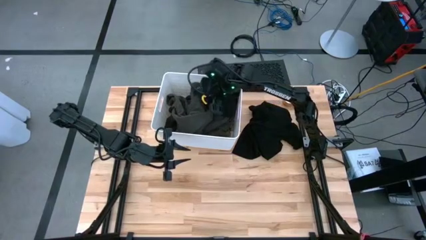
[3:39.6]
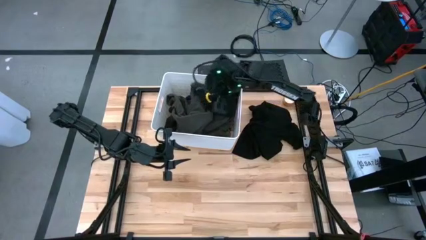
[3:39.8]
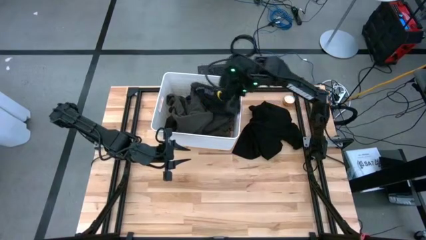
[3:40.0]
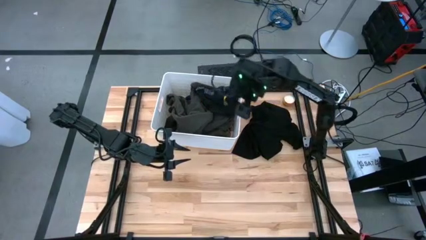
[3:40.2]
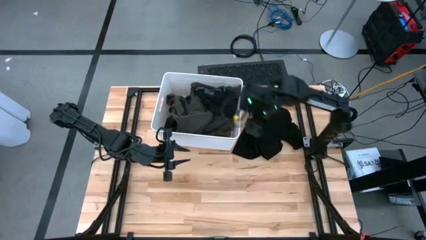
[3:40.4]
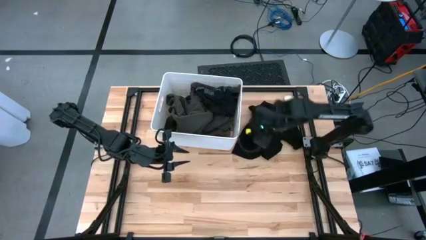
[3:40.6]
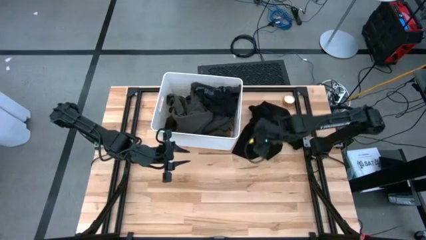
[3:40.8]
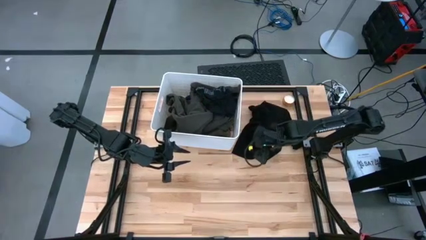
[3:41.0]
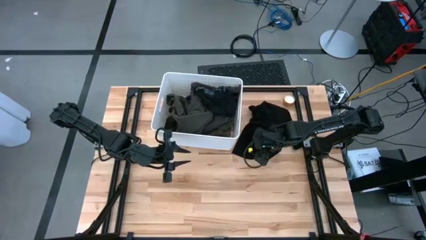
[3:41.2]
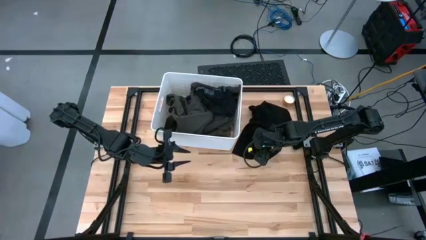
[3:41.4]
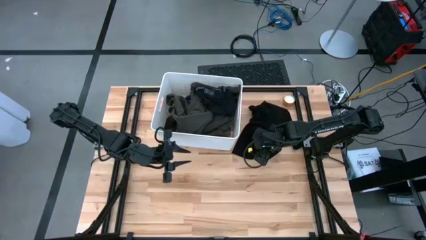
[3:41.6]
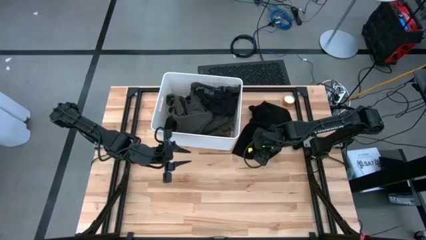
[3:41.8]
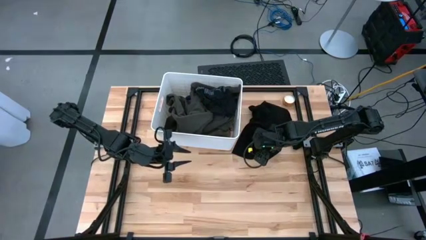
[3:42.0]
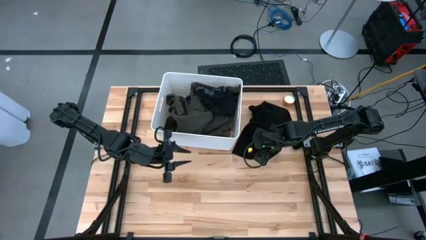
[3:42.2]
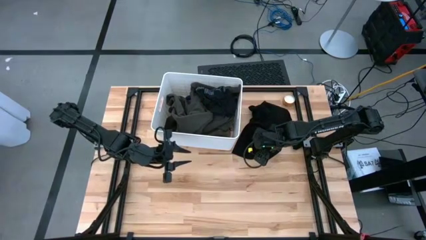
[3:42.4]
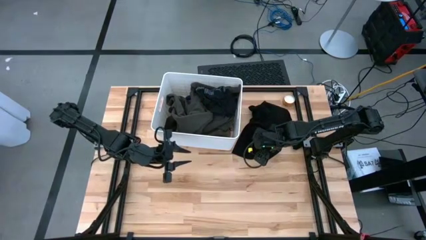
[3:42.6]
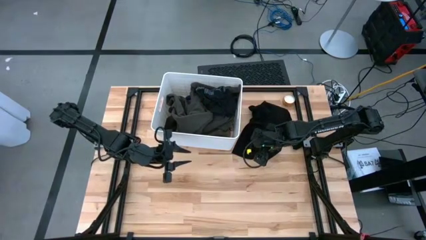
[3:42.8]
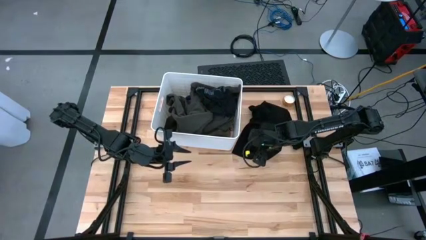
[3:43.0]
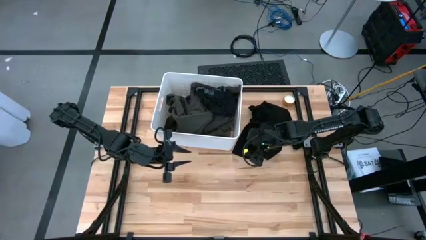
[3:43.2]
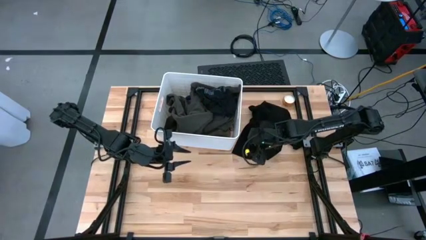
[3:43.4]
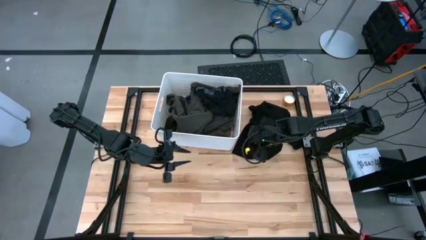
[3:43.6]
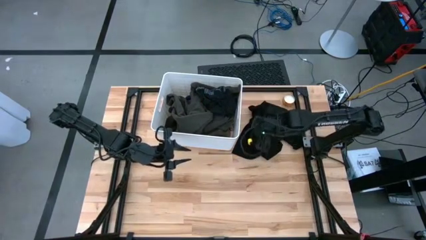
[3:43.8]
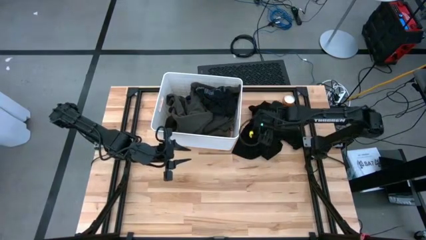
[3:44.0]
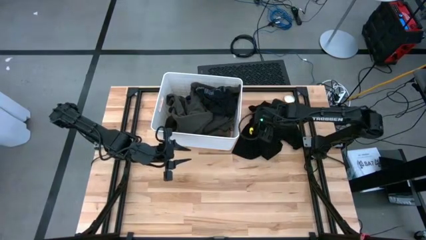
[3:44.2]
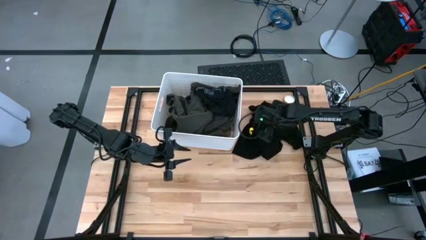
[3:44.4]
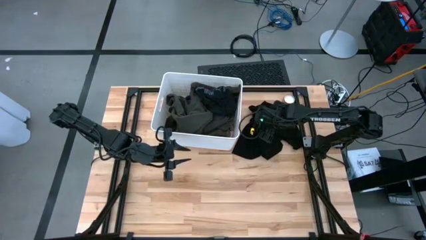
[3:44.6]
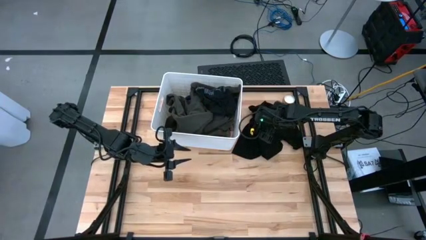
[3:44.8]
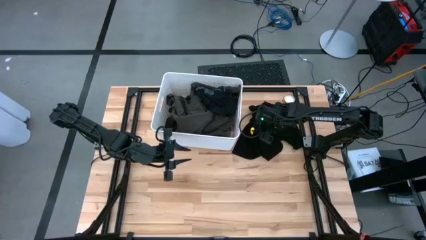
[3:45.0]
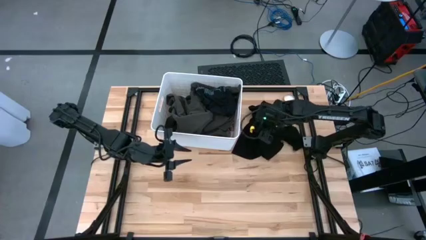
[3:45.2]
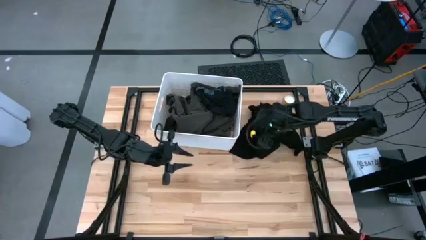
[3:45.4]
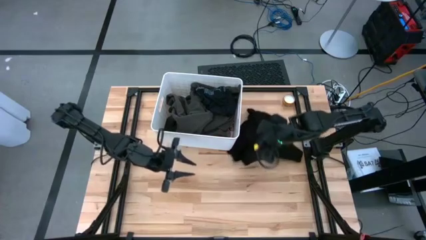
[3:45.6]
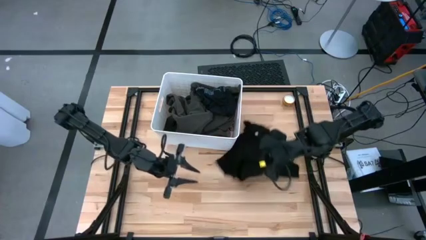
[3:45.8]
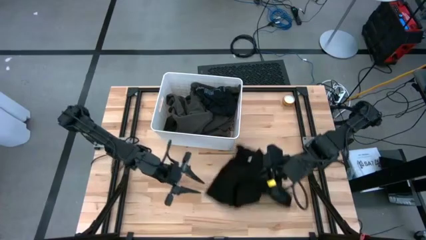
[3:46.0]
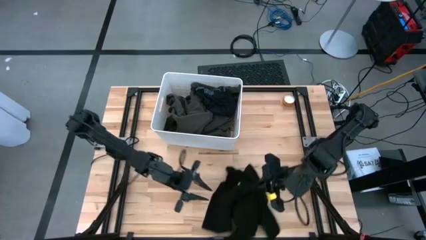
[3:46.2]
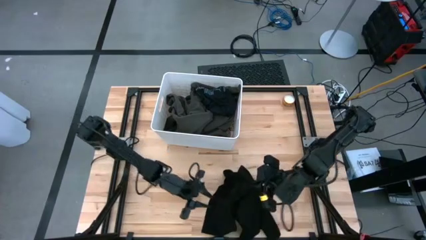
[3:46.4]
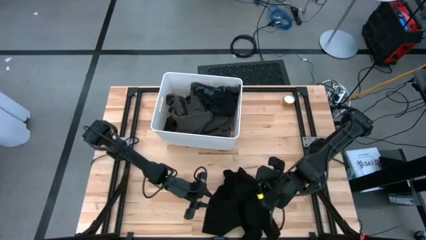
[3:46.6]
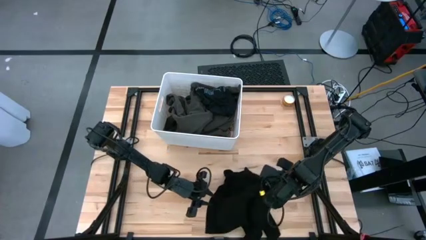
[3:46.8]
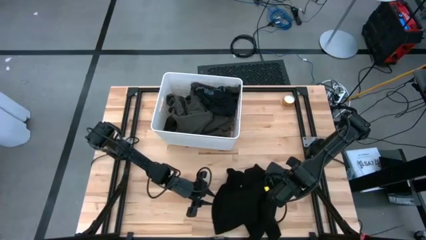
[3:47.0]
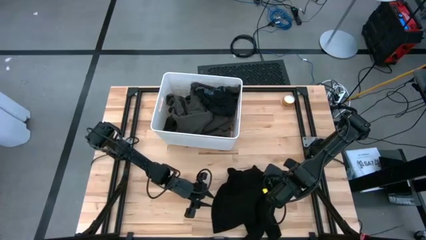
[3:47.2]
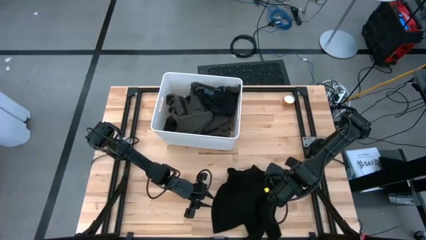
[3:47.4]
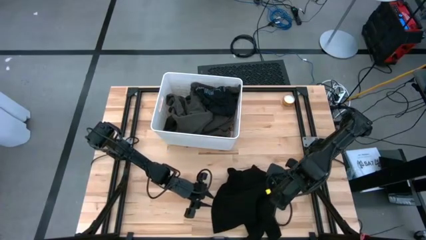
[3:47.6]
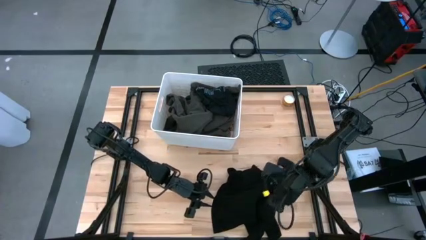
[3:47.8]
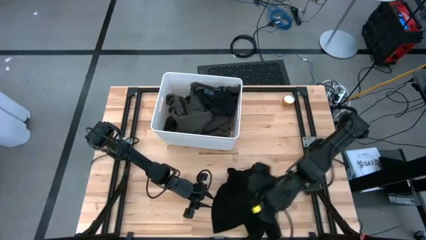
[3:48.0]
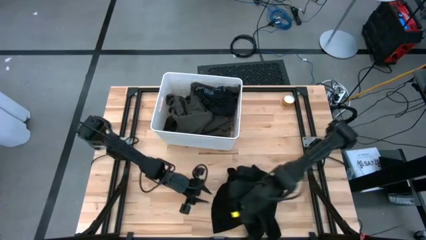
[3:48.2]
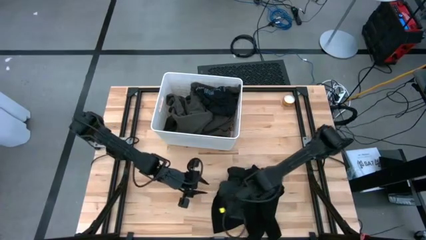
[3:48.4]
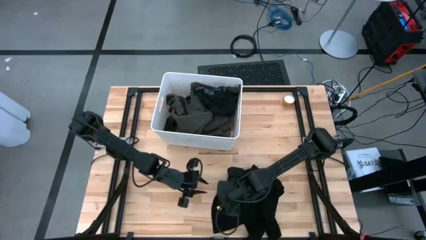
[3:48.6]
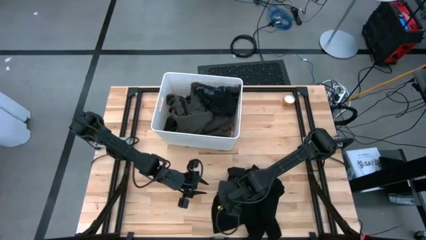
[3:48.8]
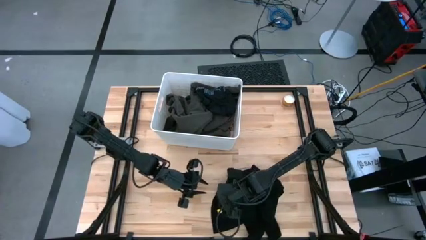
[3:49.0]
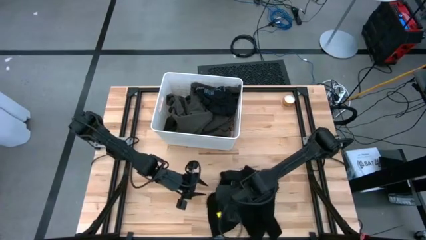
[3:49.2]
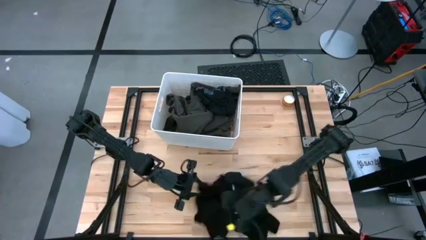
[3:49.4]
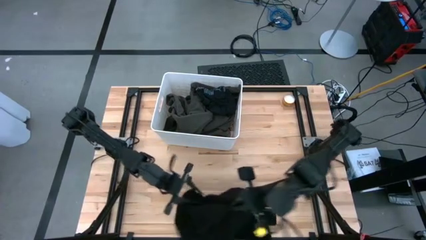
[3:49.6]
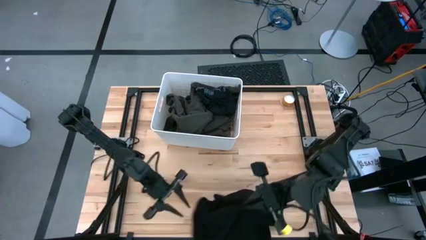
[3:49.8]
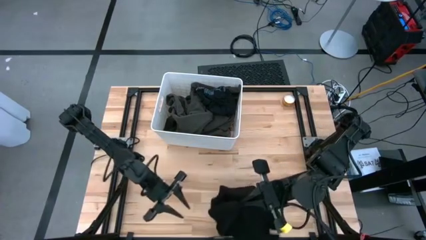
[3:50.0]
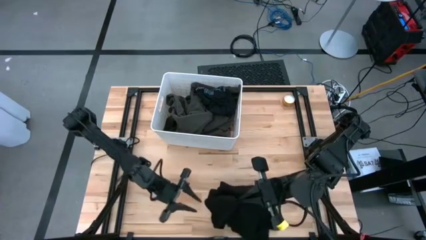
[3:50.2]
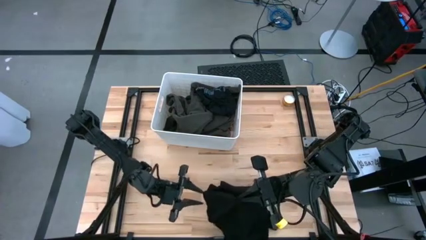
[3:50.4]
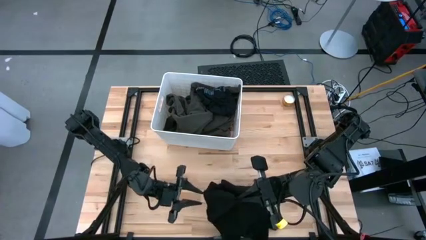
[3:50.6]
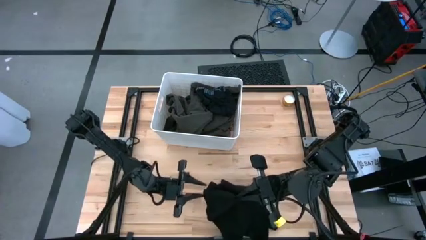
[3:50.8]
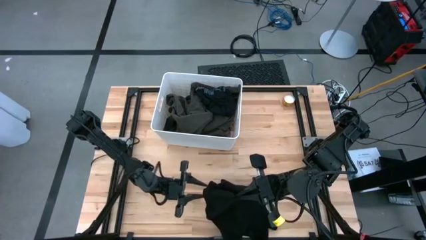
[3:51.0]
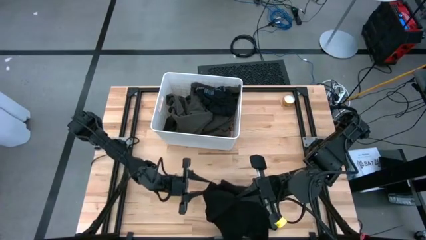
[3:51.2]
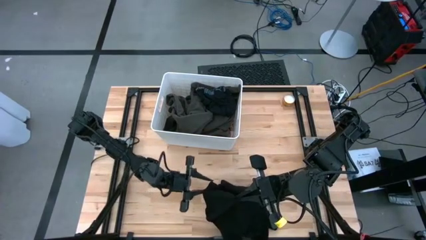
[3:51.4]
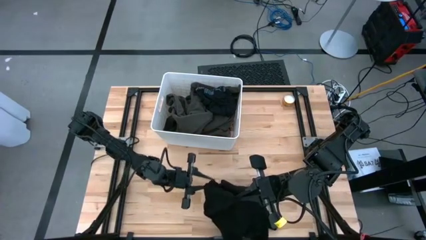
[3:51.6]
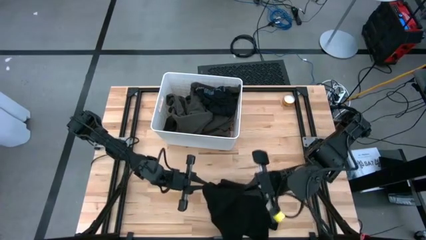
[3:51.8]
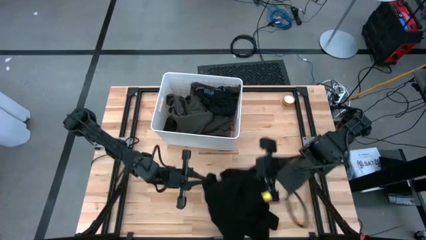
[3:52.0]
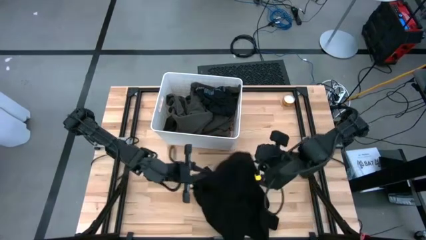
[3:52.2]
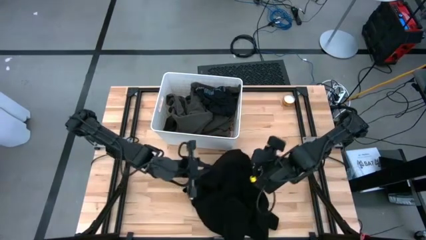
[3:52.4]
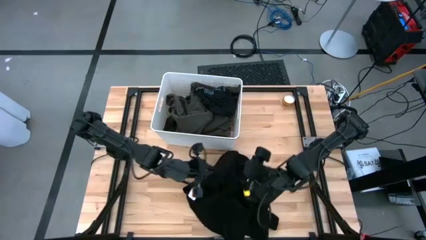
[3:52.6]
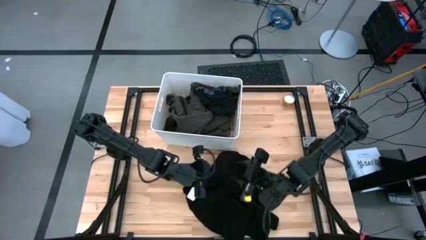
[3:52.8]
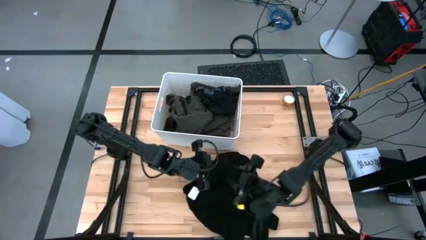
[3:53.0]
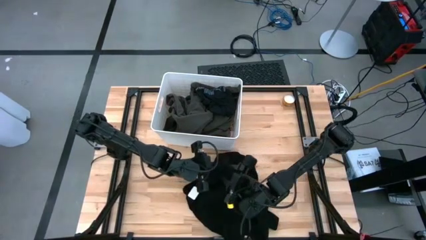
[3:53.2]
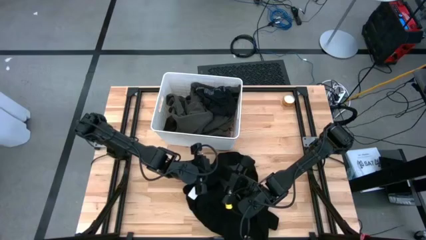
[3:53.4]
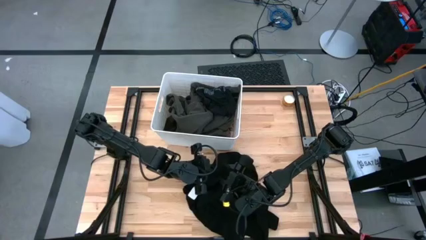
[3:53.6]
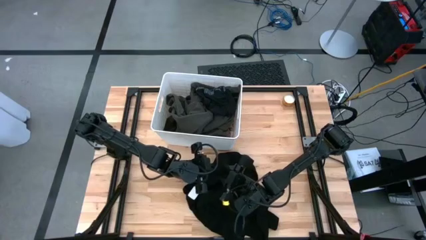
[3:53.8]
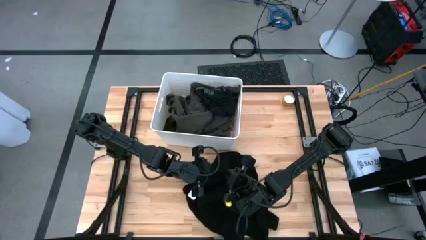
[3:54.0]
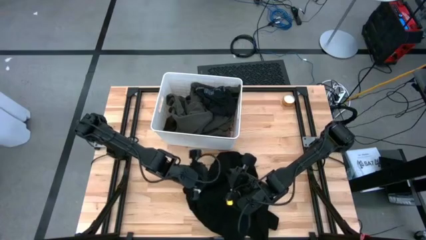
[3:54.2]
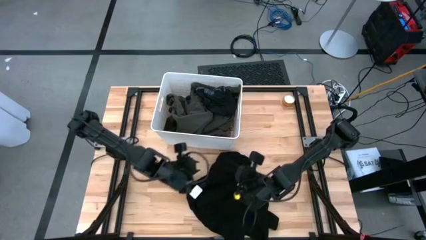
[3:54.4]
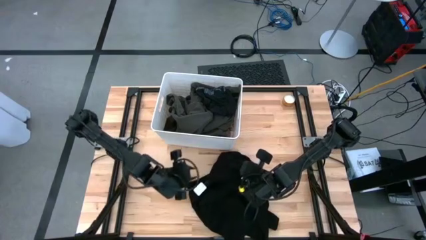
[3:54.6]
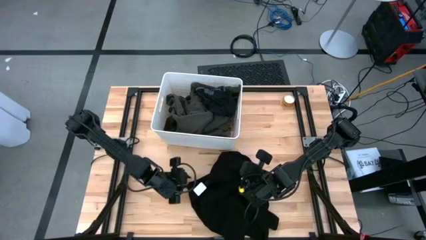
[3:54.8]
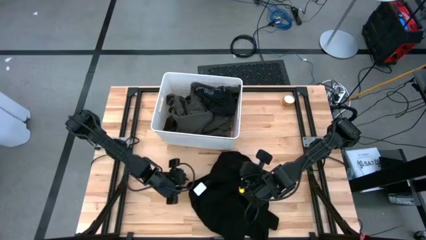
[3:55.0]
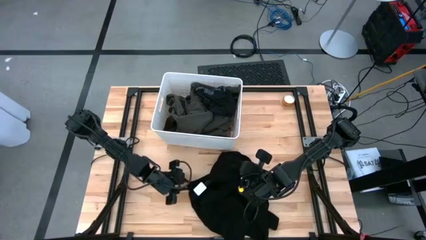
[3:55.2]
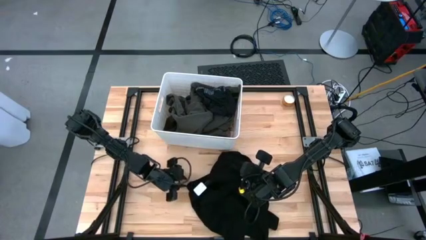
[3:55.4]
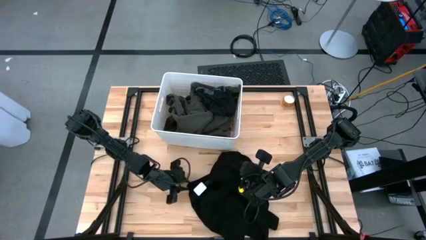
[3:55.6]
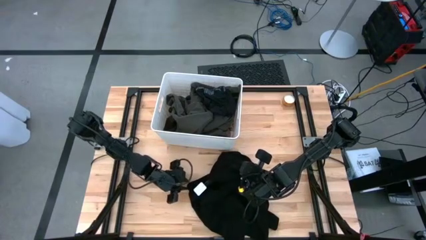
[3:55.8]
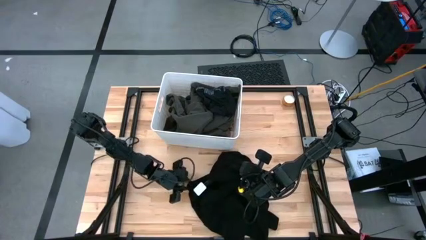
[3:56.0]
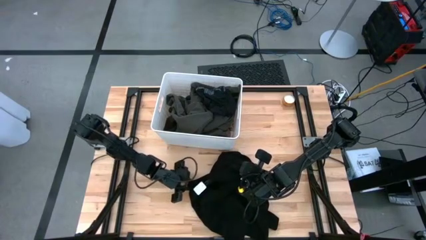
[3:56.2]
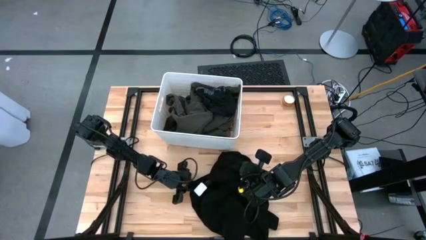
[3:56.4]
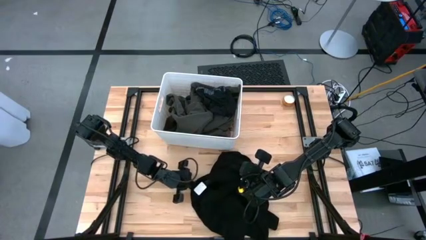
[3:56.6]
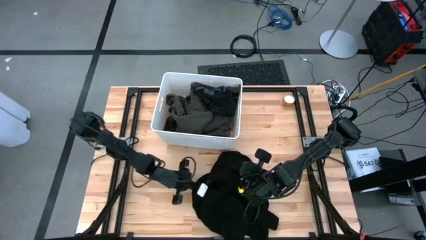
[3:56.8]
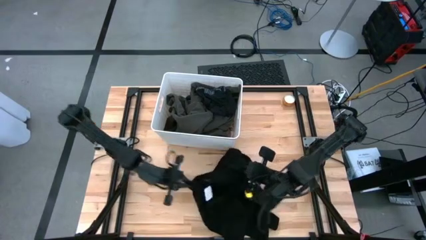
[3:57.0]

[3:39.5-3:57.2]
Task: Sort clothes
Put the black shirt into the white laundry bin

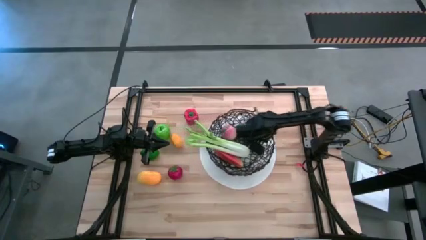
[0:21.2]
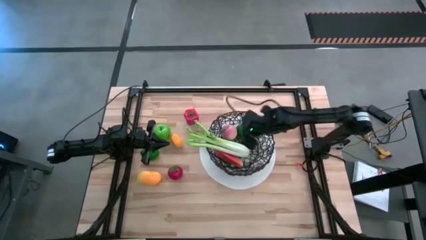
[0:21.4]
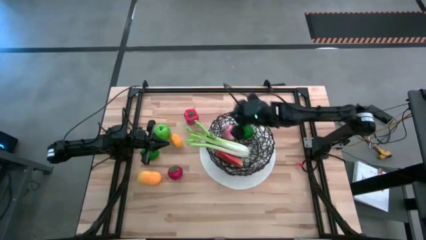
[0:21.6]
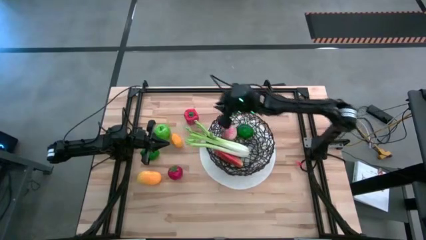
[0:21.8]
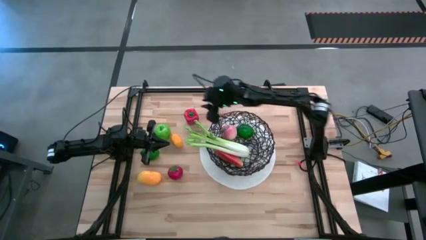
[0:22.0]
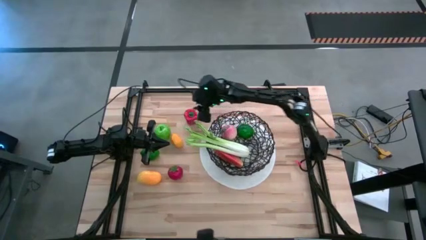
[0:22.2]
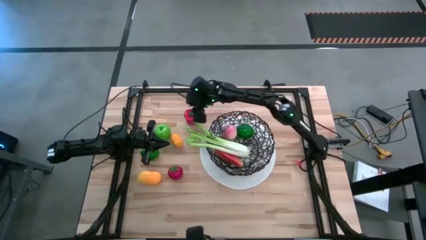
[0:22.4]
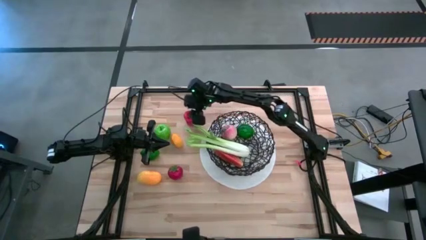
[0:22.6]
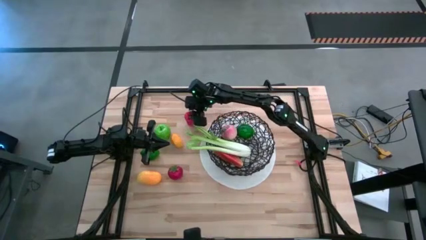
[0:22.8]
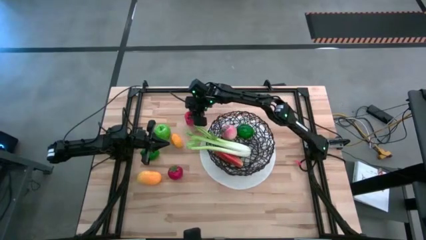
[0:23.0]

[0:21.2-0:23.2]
Task: Build produce basket
Put the red bell pepper into the wire basket
